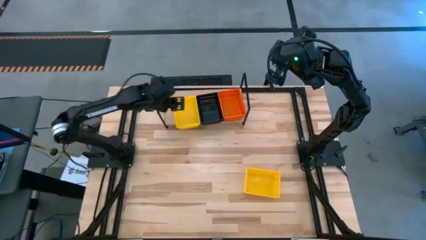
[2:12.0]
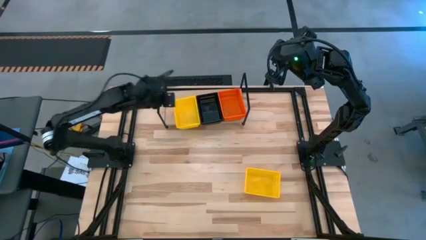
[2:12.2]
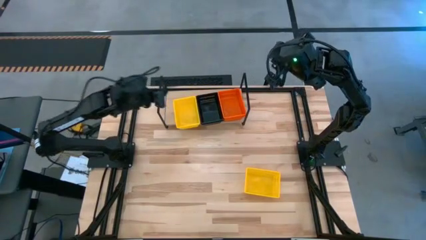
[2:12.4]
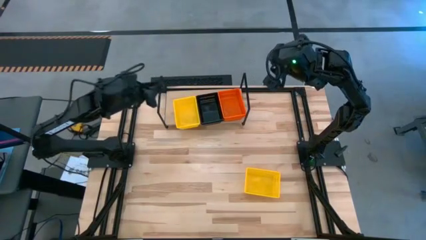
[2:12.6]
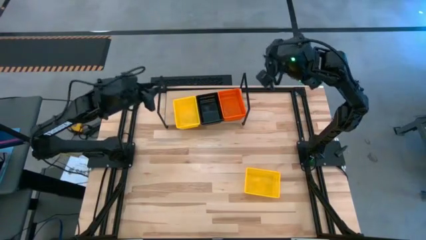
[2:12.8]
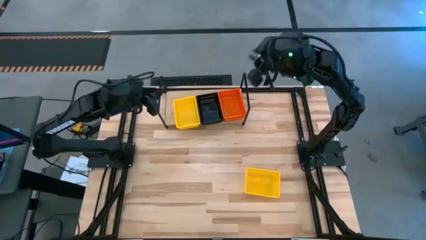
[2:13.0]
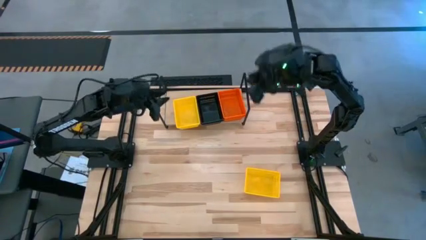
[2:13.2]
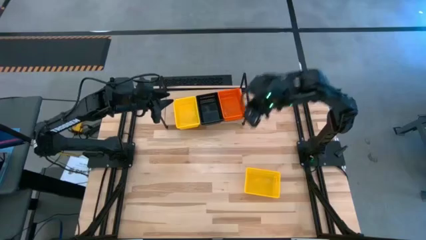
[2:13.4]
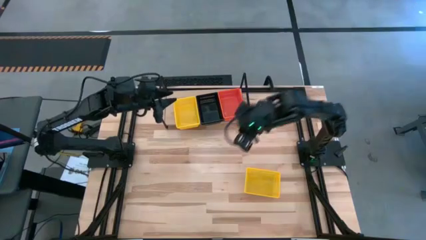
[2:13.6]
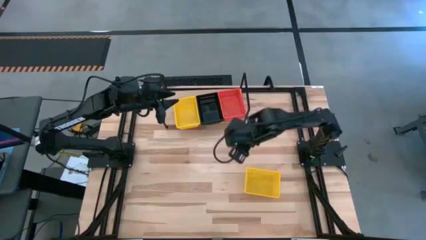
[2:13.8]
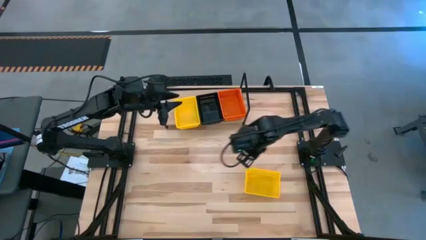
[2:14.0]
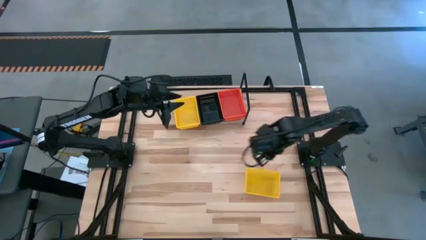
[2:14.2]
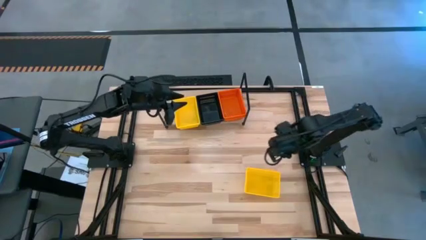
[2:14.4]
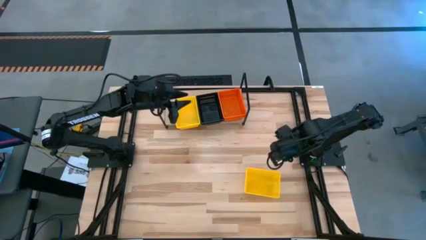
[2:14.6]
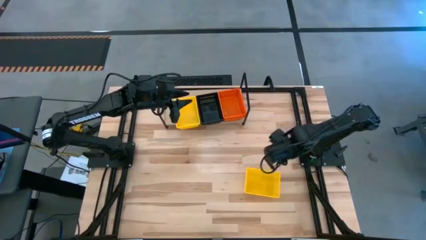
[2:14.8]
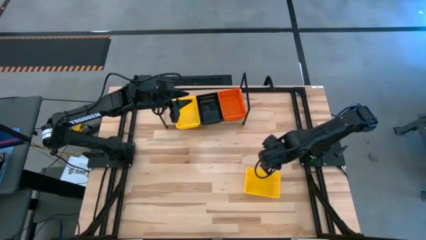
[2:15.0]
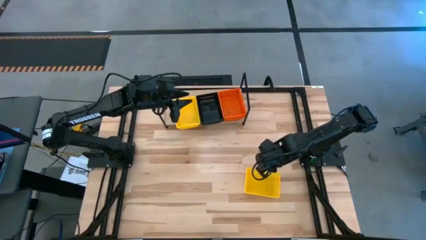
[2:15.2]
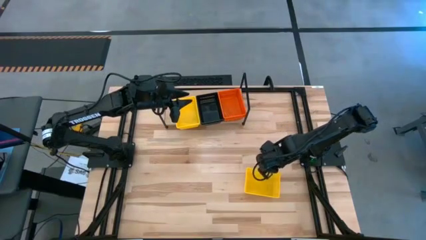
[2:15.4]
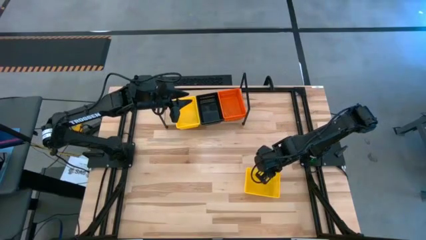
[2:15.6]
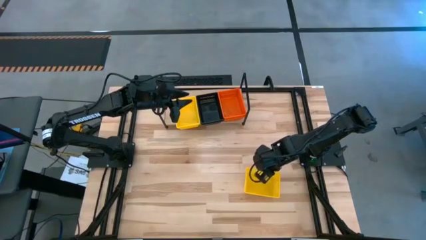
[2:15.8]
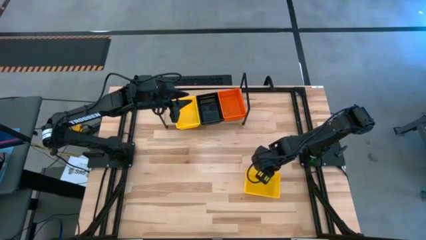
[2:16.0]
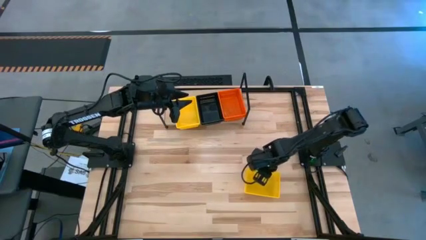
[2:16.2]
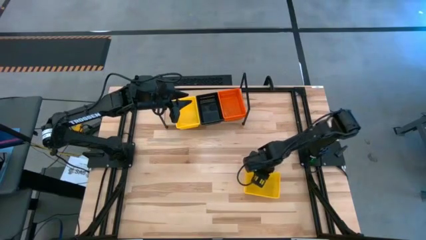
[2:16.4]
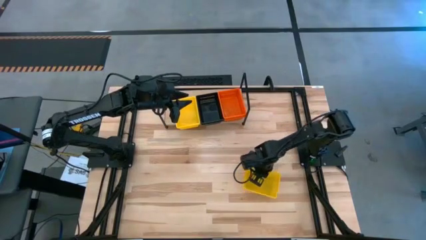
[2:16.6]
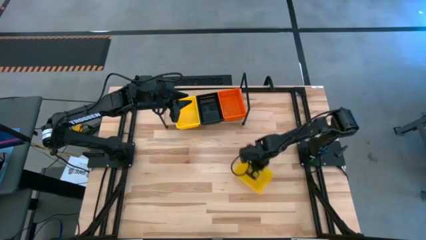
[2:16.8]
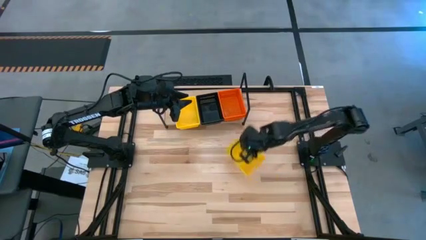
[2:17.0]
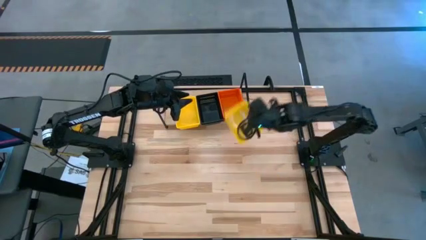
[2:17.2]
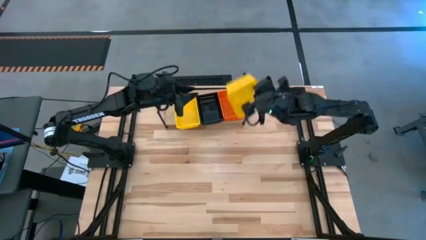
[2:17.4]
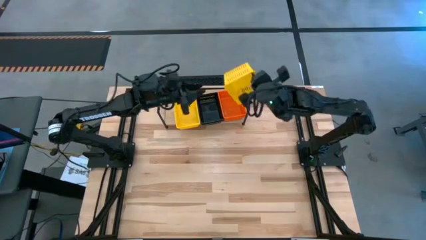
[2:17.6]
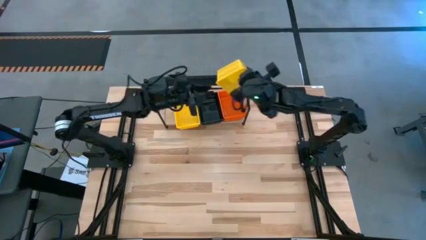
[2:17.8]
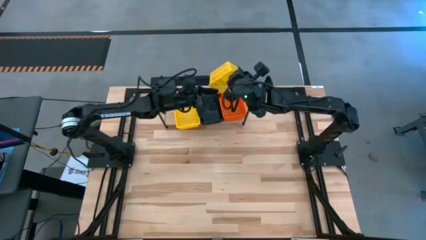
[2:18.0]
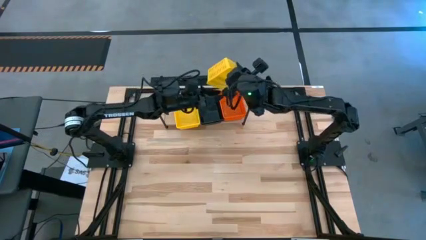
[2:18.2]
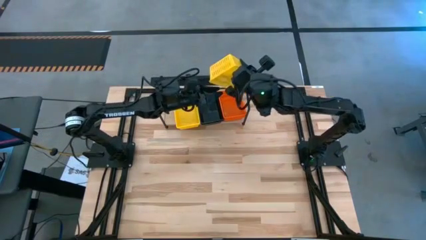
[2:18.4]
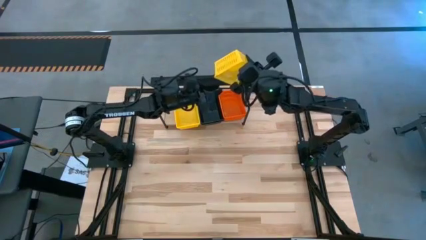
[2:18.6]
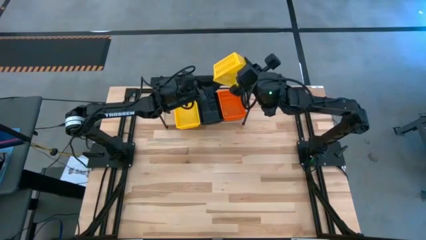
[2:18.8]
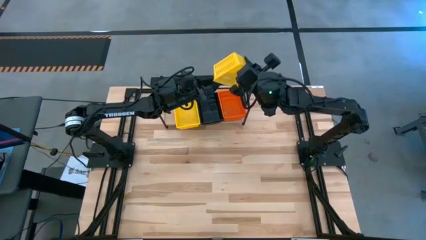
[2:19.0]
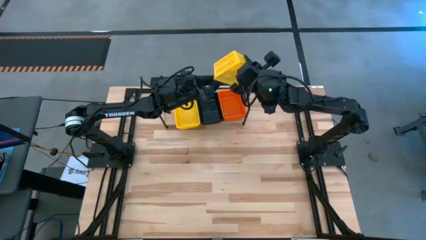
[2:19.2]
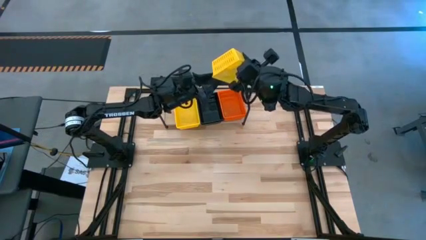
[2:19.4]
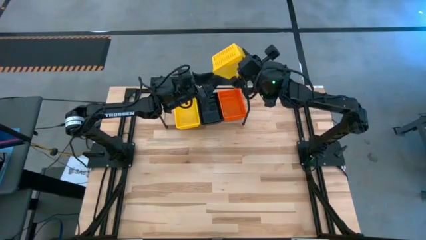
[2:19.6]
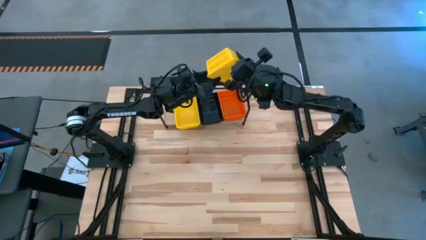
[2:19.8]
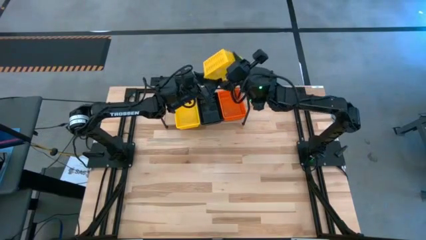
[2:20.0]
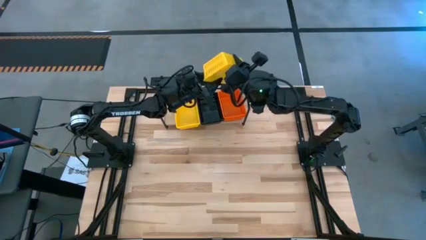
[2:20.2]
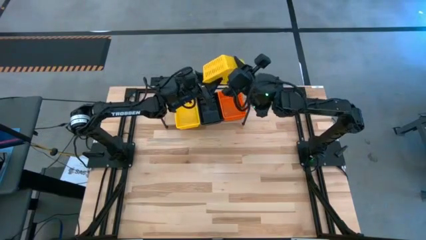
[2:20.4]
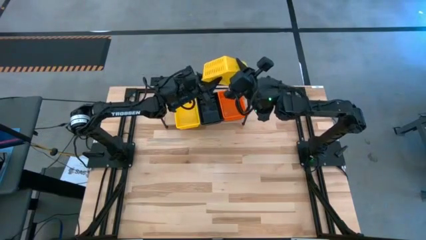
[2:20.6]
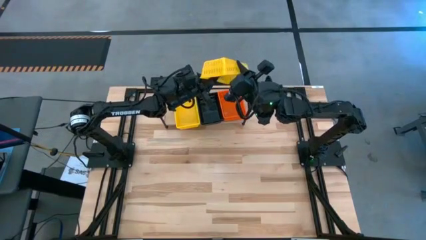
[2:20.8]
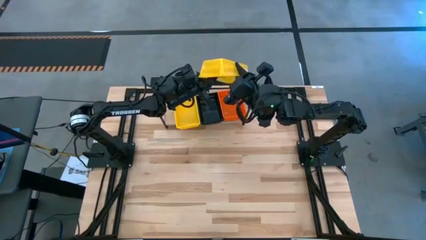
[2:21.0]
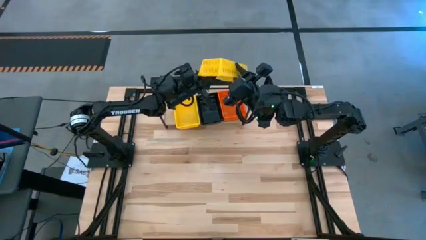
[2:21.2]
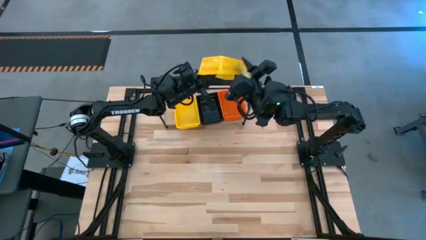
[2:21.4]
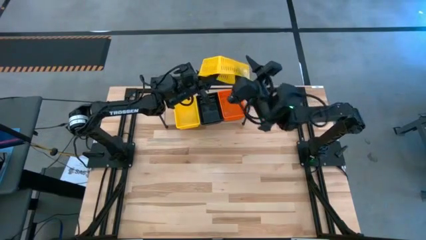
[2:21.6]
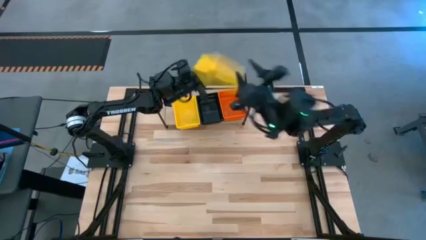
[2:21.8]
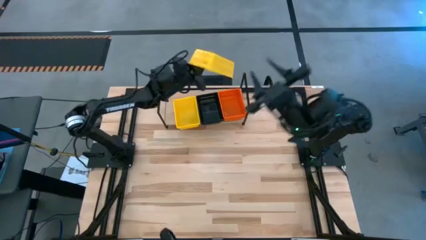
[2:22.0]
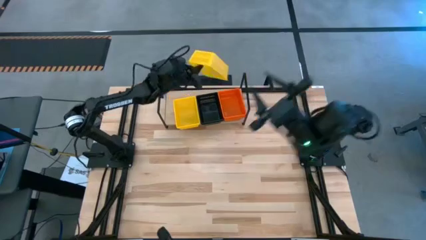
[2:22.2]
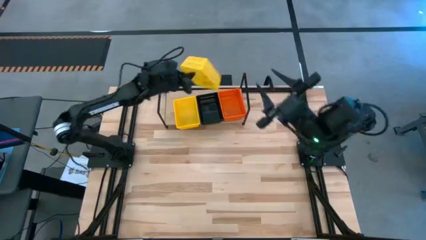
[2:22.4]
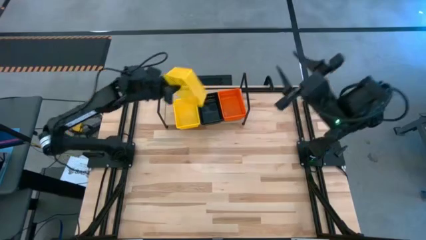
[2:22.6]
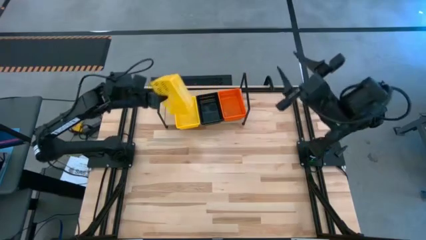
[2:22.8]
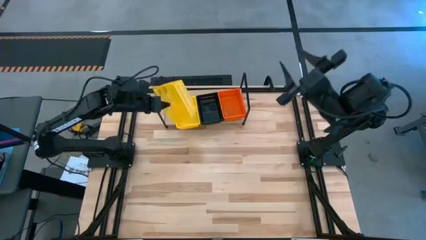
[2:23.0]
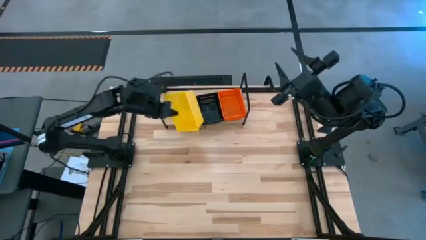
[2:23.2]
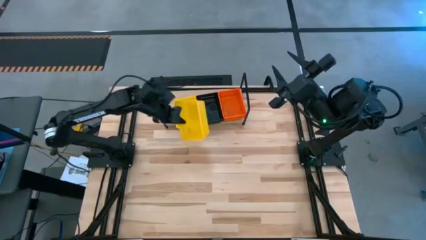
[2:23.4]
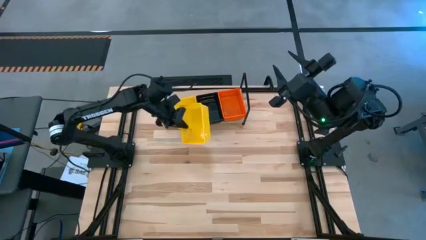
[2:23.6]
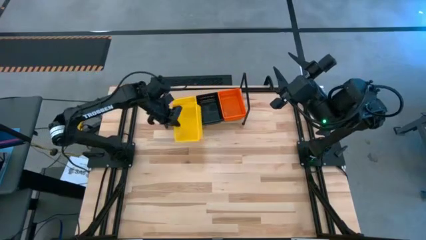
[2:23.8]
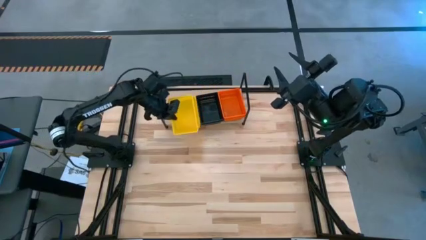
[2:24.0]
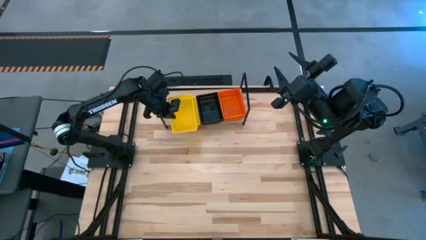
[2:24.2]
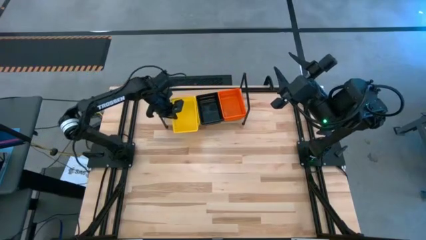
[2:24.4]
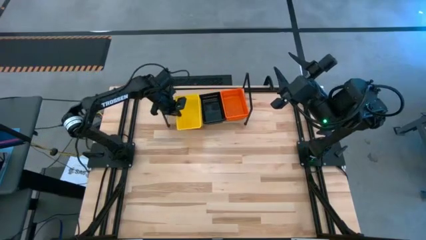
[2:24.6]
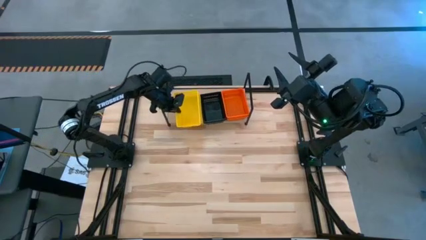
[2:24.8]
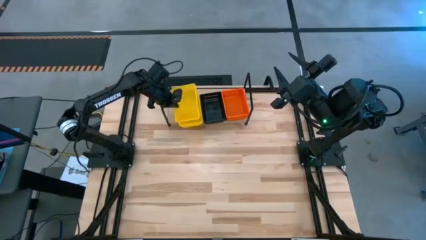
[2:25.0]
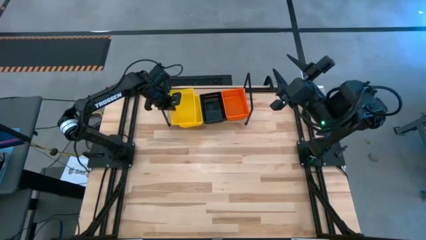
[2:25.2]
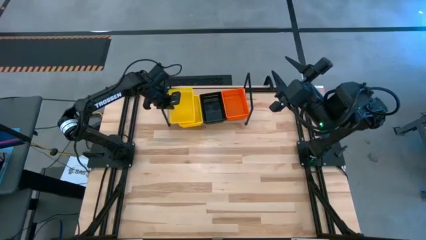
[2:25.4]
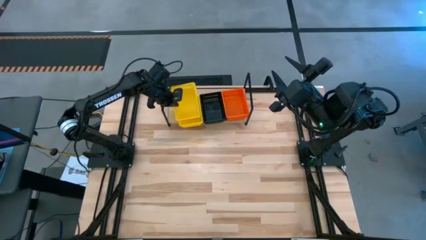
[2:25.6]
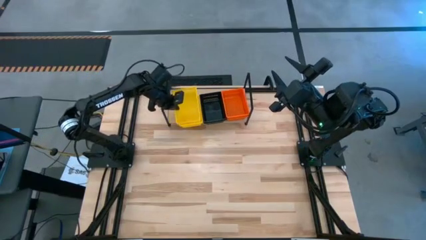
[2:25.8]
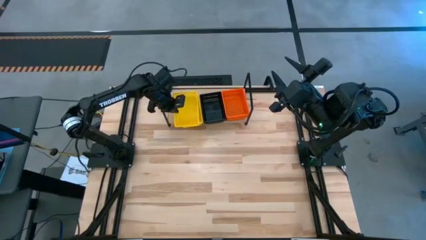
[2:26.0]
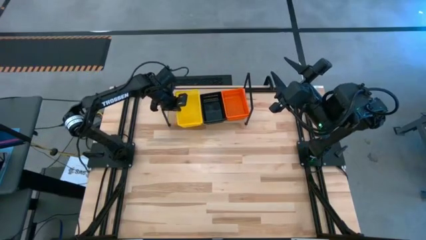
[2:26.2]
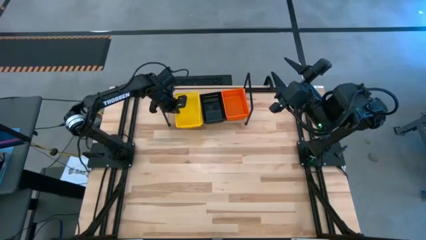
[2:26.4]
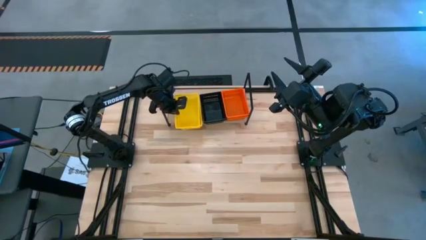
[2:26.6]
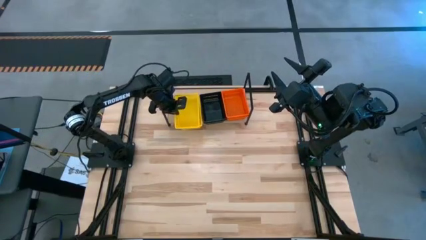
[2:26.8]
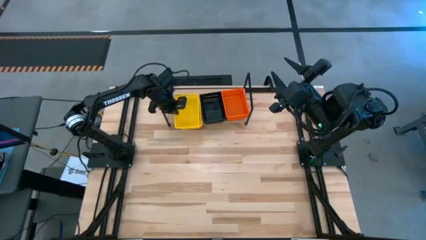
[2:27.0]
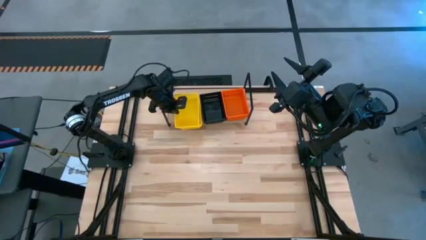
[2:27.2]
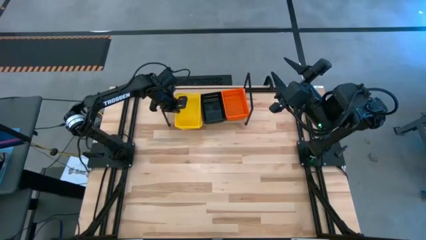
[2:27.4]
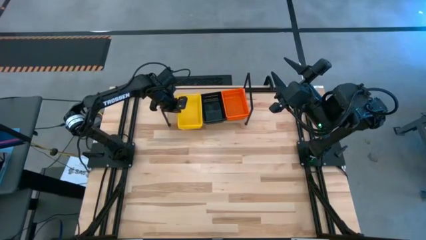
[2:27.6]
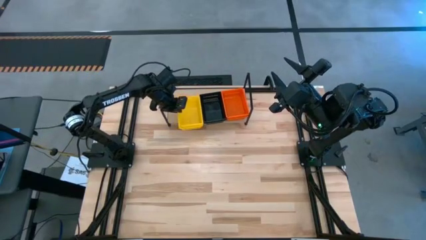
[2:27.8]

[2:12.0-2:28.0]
Task: Stack baskets on shelf by color
Stack the yellow bin on top of the yellow bins on the shelf
